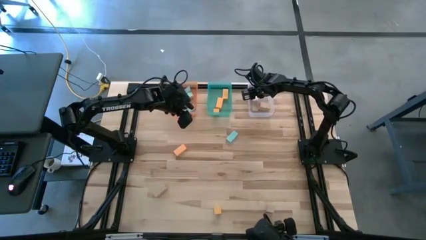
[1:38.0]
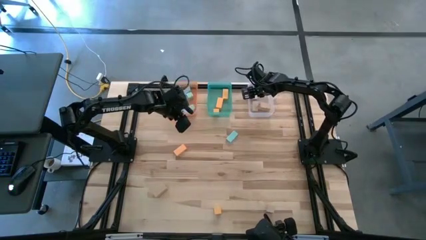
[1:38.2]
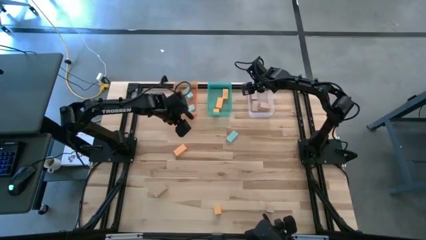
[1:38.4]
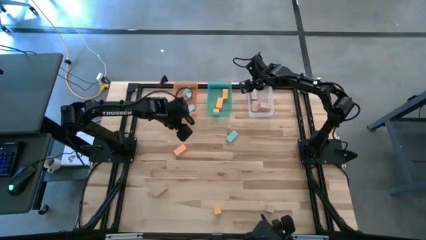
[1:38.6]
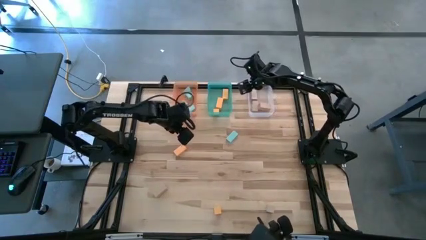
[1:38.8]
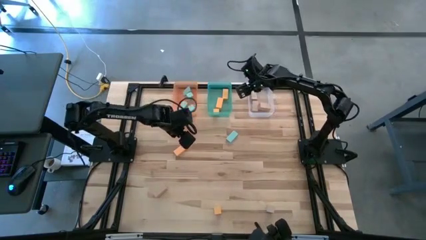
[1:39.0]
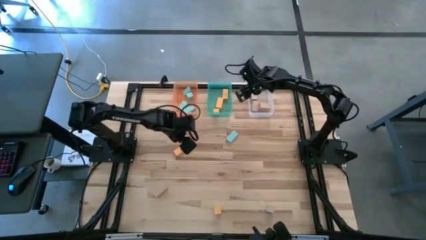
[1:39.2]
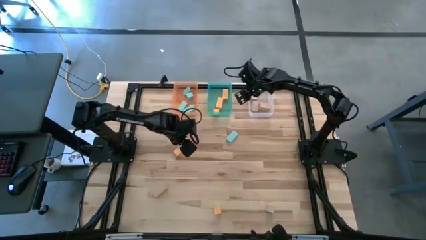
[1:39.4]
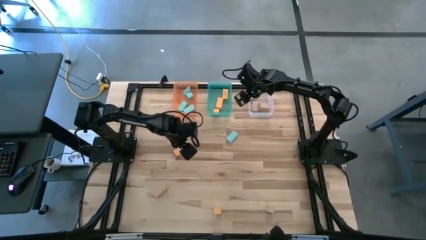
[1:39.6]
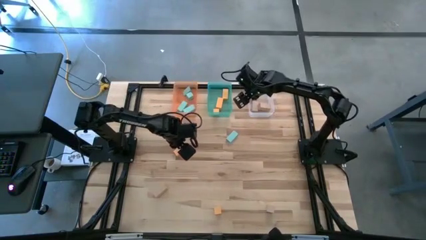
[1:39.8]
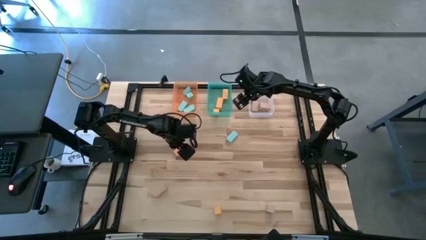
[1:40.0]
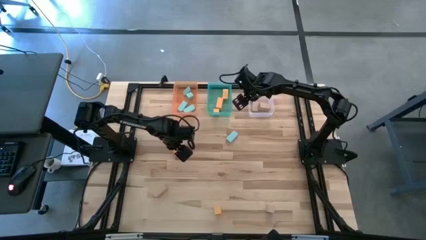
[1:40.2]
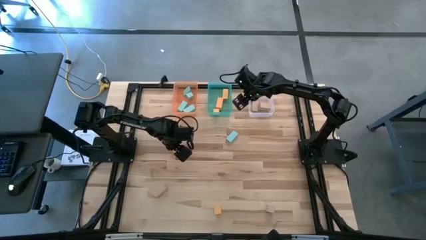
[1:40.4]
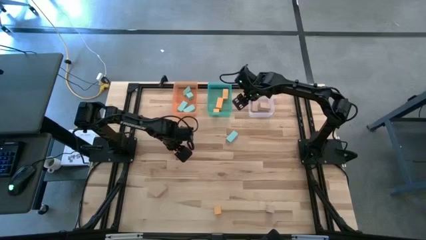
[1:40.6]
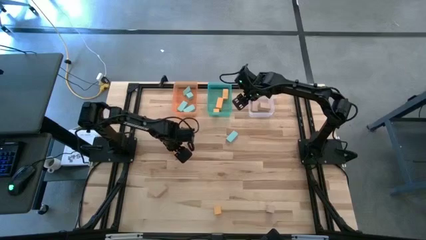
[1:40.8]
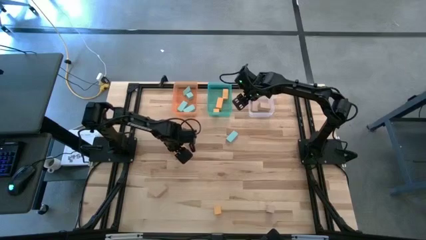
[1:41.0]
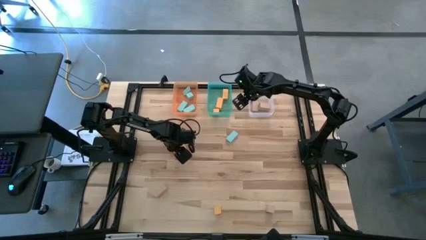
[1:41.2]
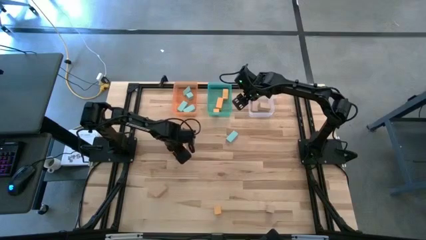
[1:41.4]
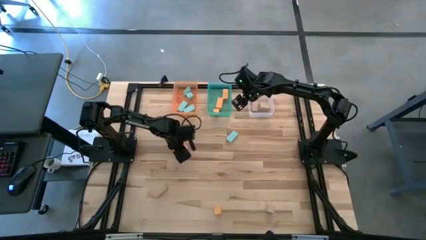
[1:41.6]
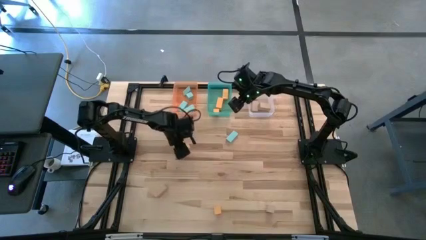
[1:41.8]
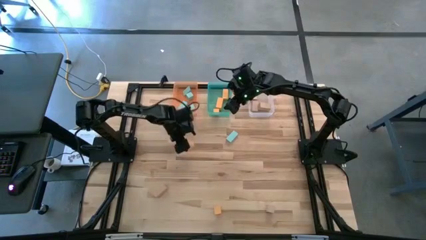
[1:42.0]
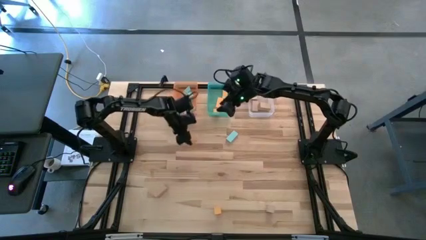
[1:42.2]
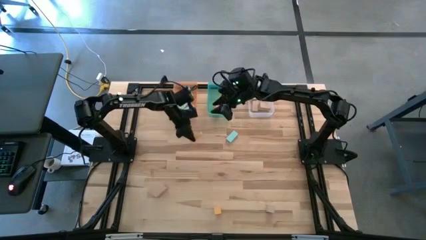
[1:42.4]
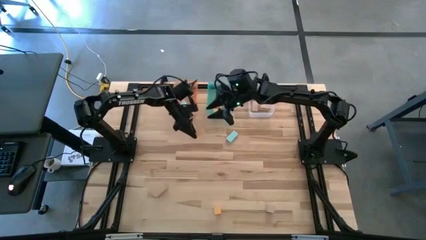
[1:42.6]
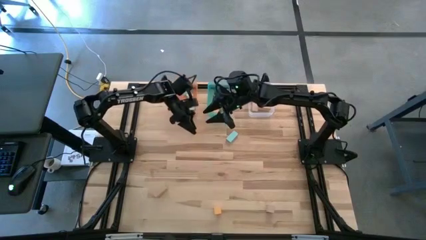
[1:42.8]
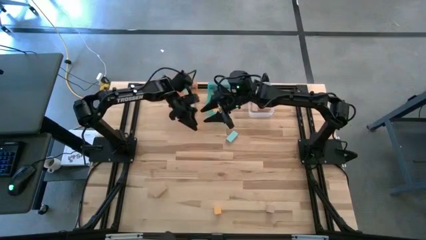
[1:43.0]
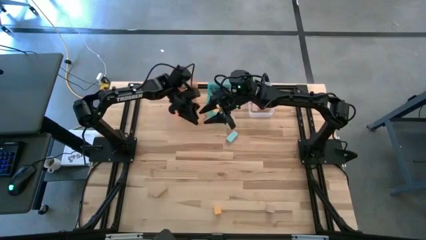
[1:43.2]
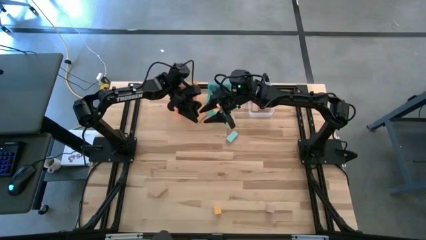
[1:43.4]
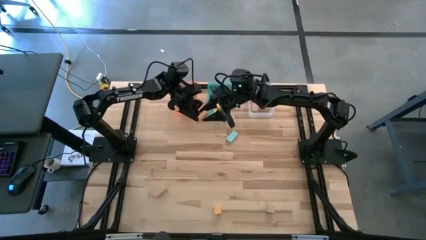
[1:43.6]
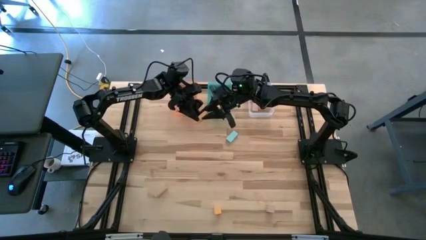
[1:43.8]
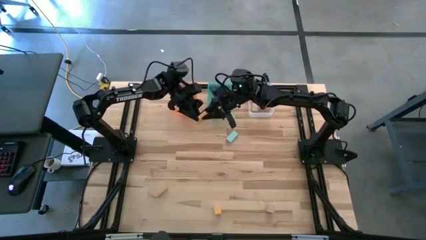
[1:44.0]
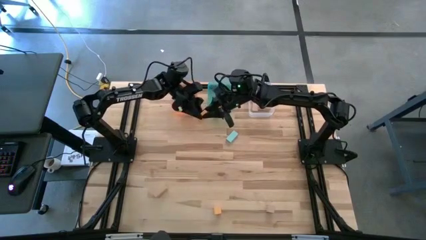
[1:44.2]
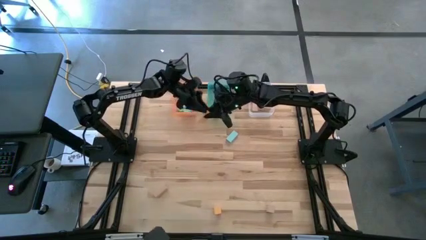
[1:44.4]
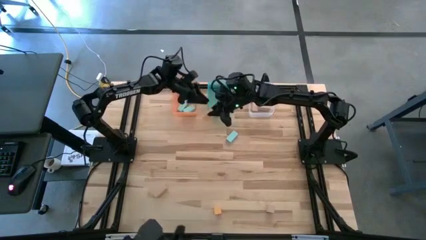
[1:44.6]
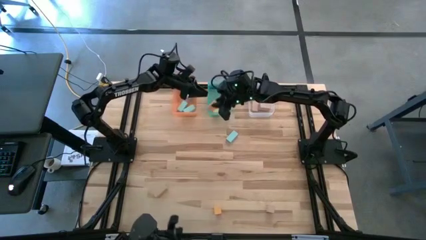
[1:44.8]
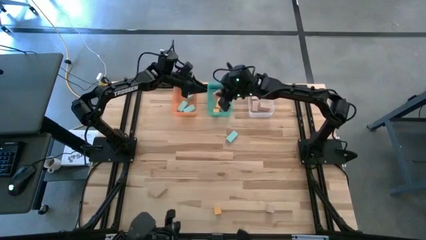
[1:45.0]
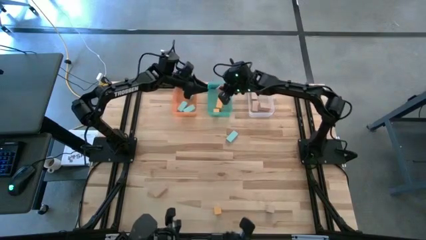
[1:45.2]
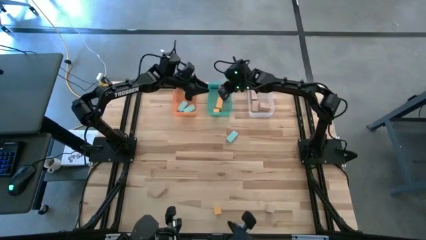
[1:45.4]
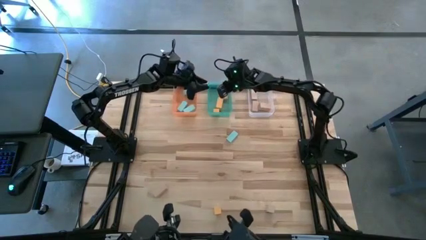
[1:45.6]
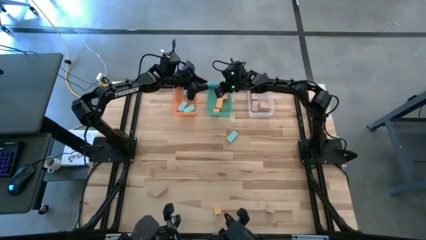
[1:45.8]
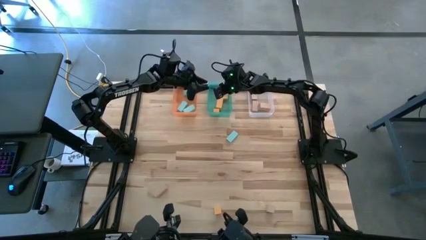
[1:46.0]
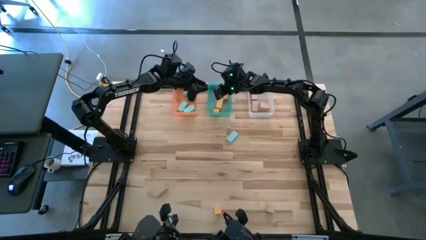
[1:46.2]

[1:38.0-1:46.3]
Task: Sort & place blocks by color
Put the yellow block into the green bin

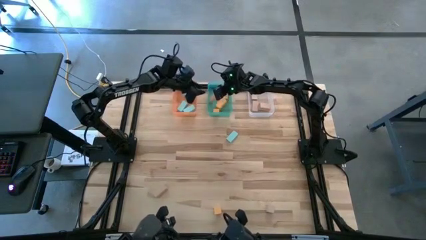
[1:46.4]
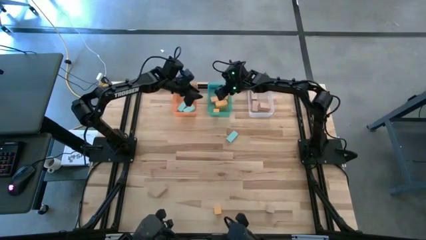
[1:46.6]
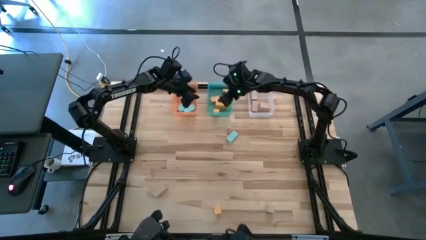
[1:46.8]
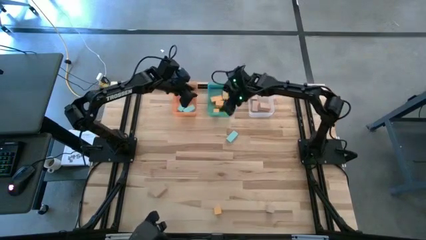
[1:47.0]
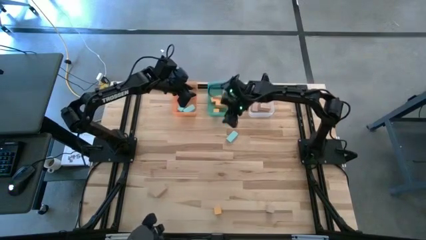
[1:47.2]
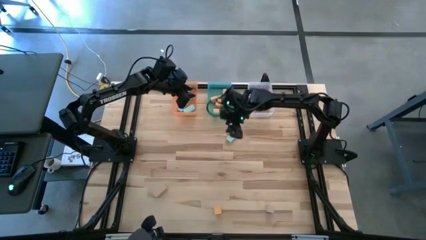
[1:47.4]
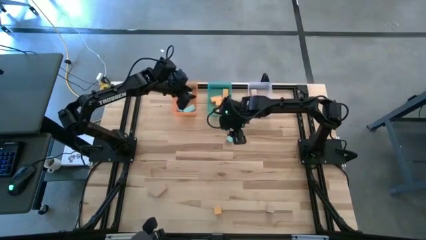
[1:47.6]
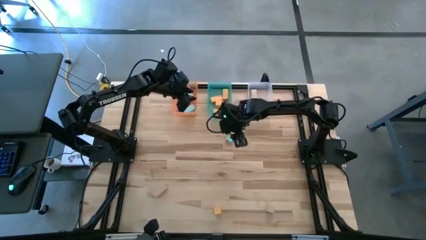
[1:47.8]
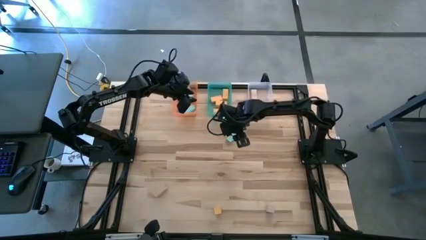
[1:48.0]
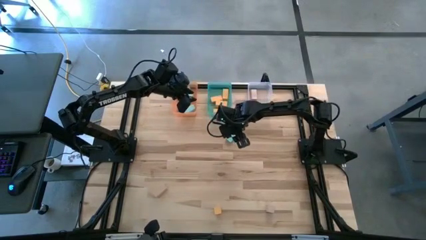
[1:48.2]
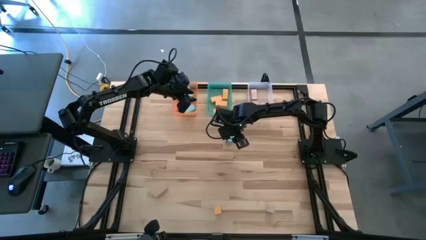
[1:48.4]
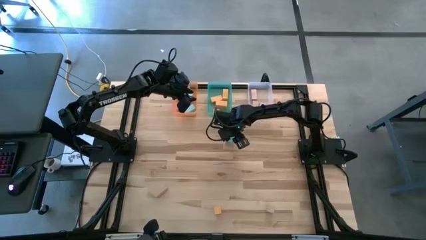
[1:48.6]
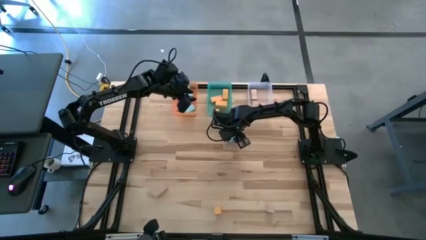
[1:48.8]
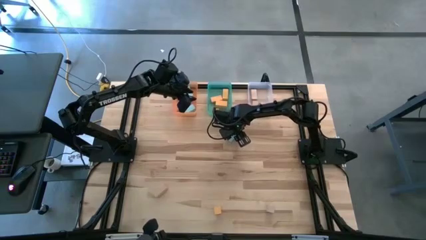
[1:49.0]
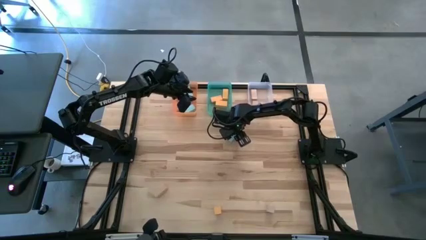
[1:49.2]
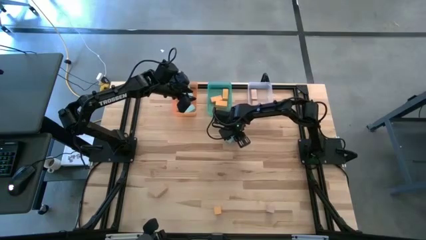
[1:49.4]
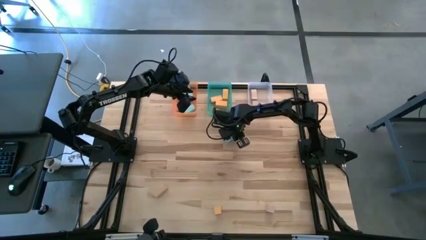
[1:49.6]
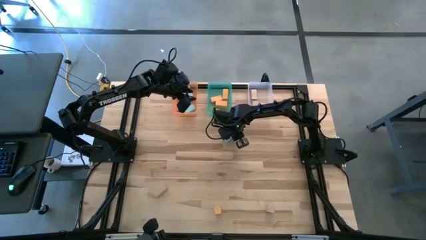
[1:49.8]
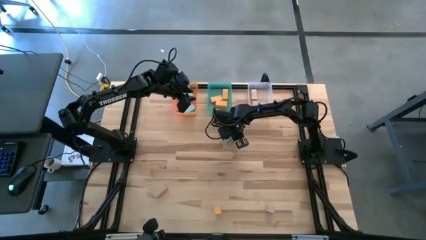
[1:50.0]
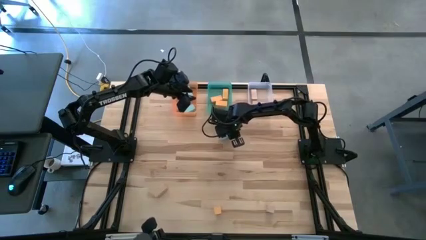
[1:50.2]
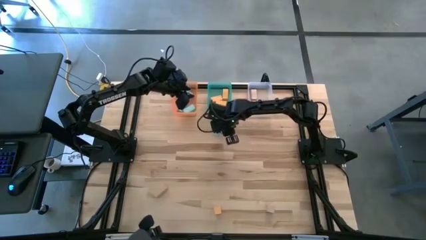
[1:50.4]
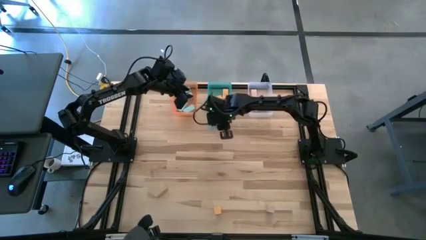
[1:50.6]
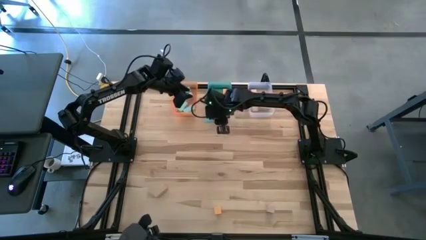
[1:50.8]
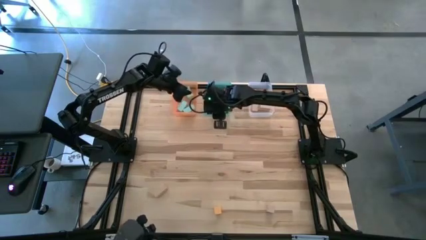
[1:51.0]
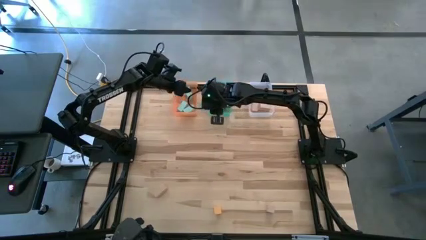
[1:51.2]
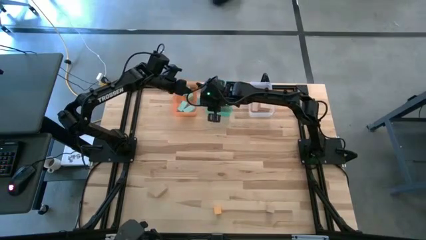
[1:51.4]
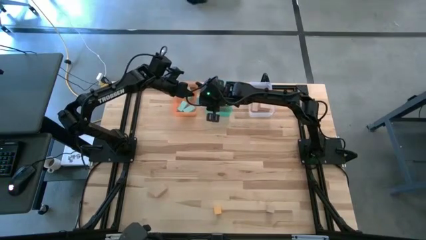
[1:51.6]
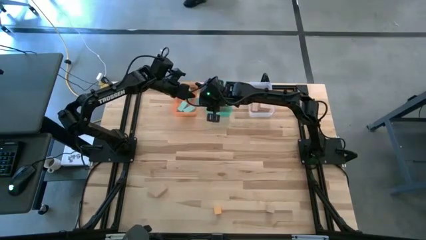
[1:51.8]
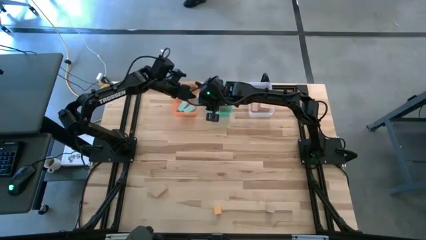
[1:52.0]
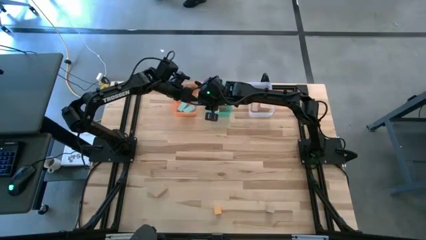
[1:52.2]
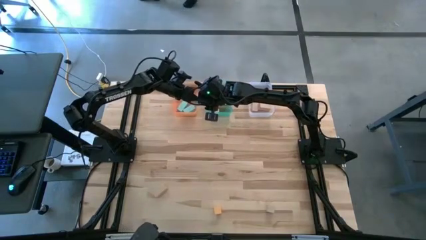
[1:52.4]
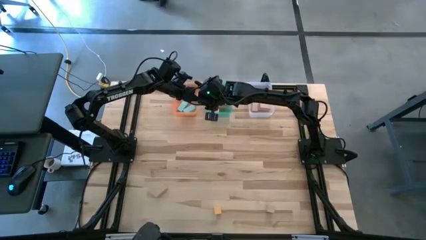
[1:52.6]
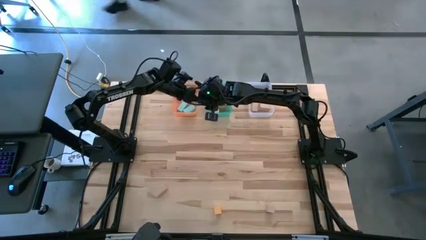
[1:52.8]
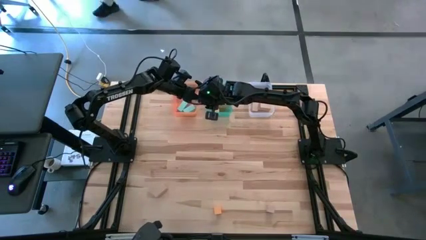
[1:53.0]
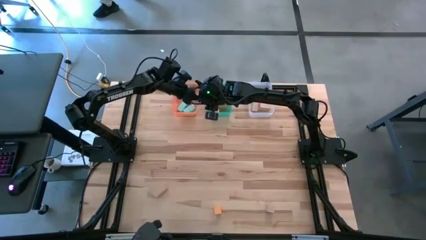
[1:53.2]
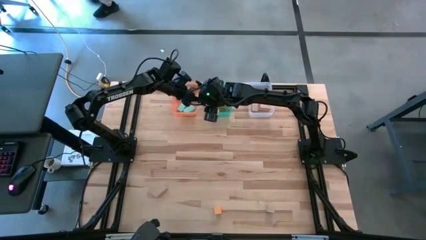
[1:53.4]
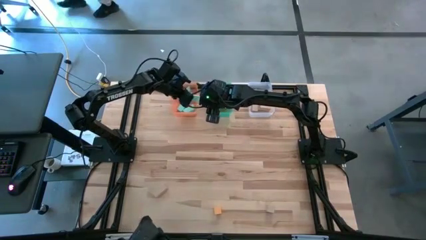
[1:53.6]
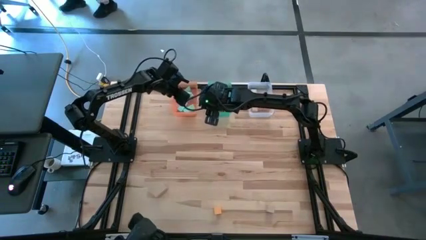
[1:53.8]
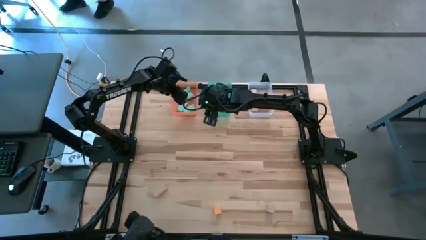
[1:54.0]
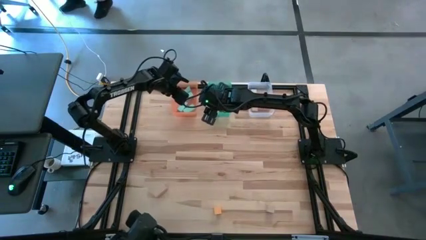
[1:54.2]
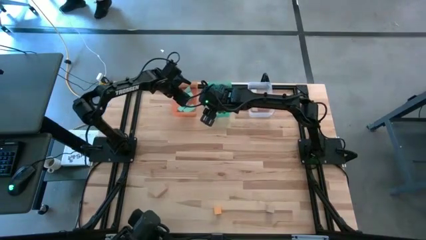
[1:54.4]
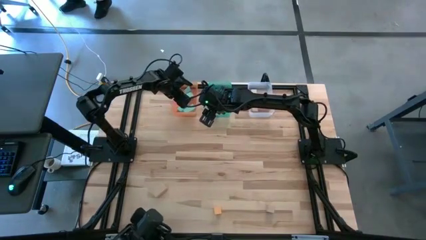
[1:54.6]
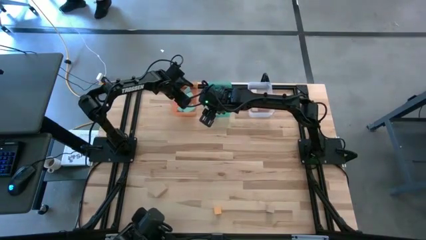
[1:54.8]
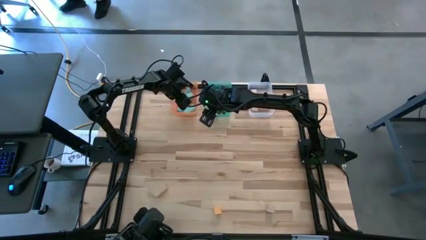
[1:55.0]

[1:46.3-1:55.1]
Put the light blue block into the orange bin
